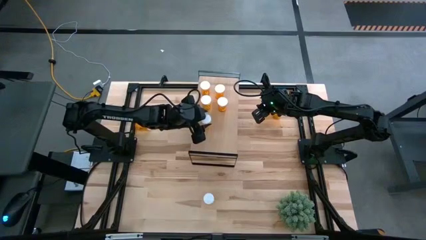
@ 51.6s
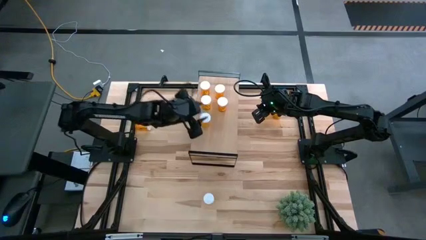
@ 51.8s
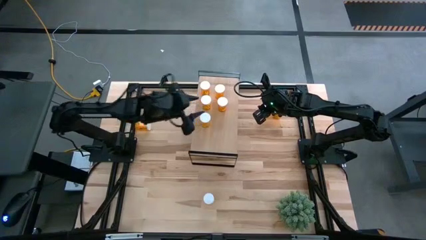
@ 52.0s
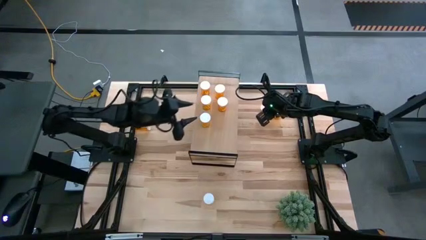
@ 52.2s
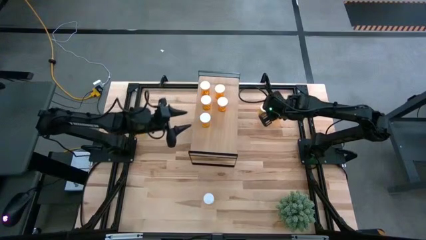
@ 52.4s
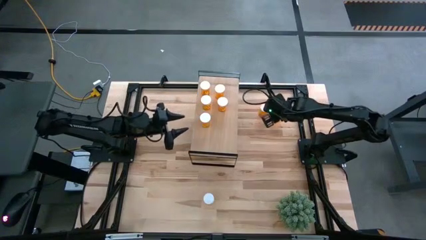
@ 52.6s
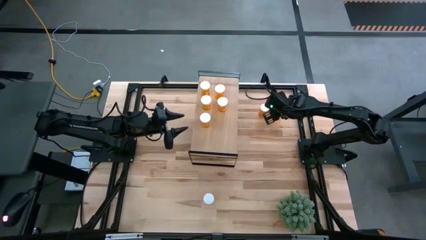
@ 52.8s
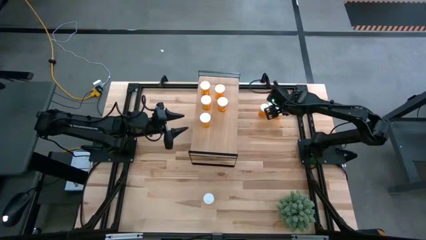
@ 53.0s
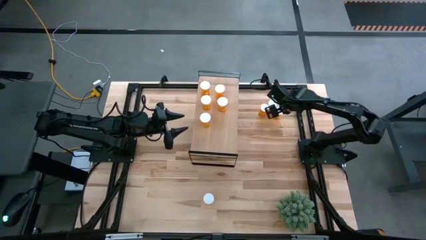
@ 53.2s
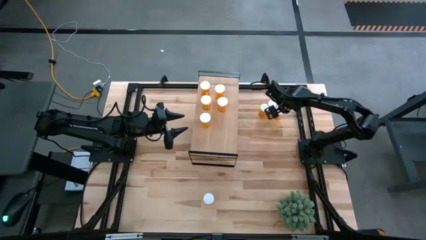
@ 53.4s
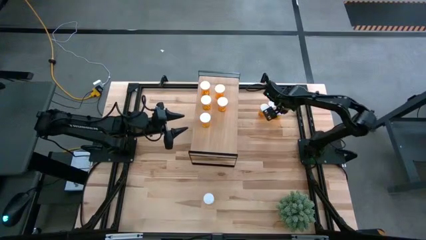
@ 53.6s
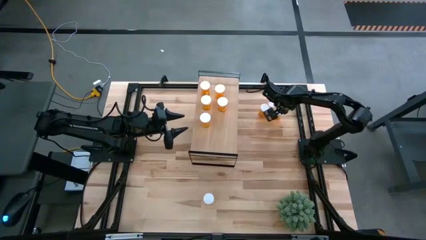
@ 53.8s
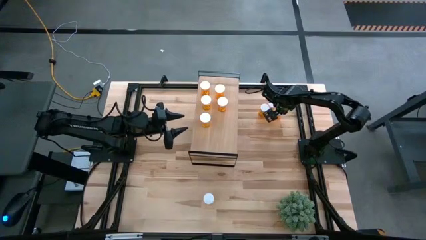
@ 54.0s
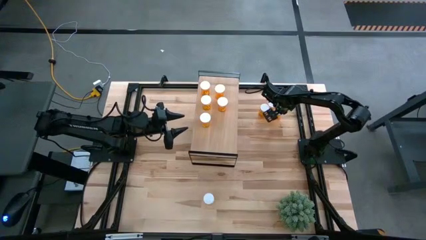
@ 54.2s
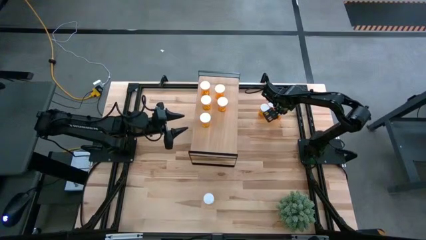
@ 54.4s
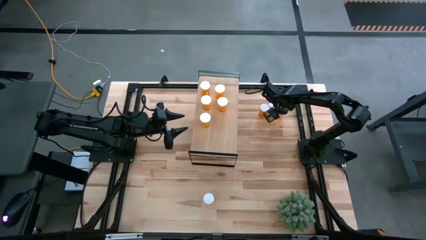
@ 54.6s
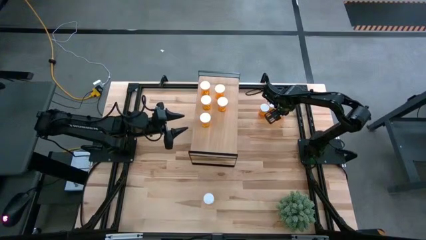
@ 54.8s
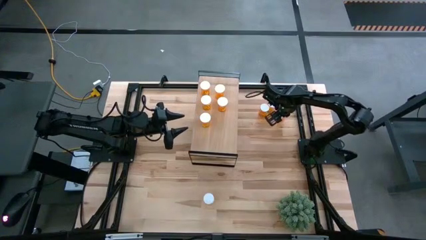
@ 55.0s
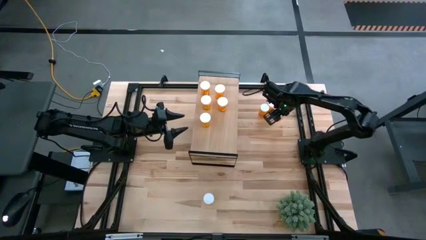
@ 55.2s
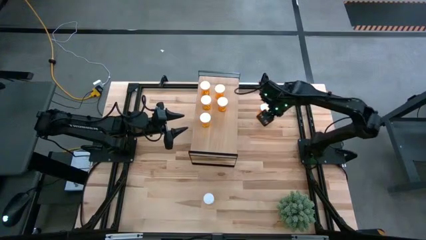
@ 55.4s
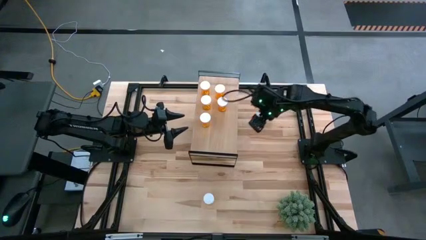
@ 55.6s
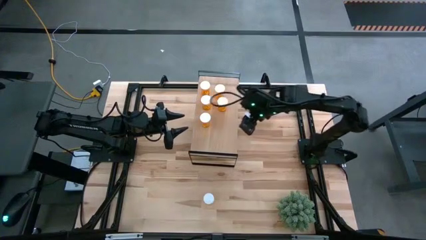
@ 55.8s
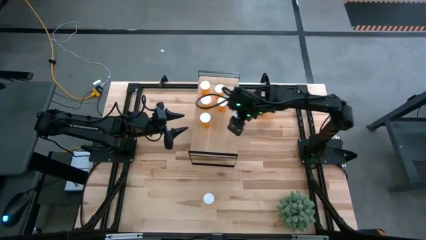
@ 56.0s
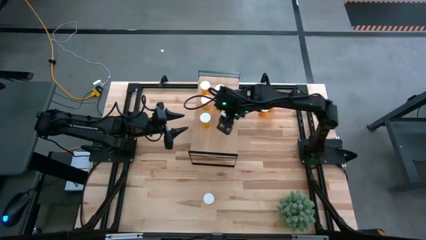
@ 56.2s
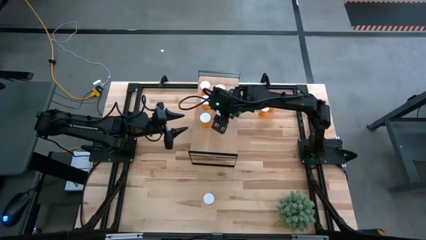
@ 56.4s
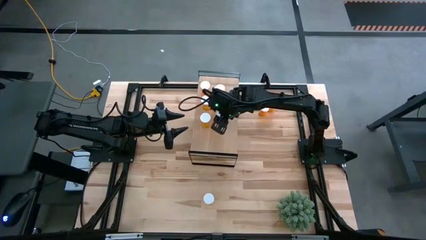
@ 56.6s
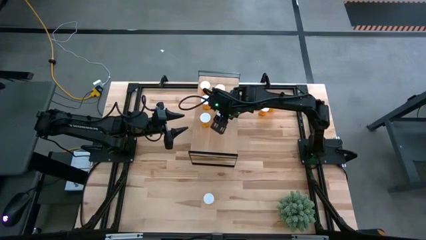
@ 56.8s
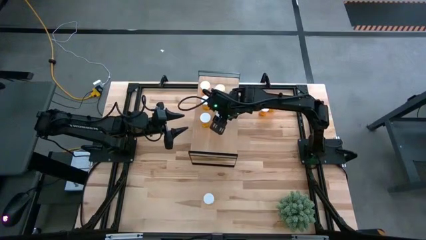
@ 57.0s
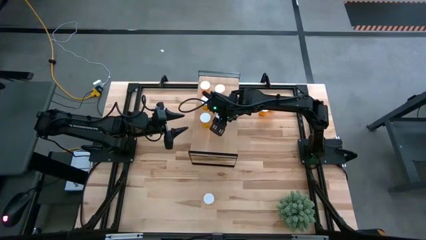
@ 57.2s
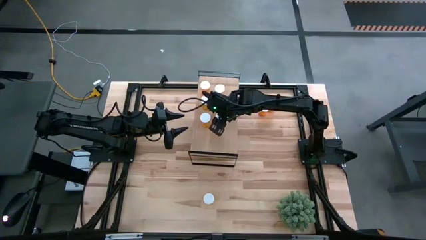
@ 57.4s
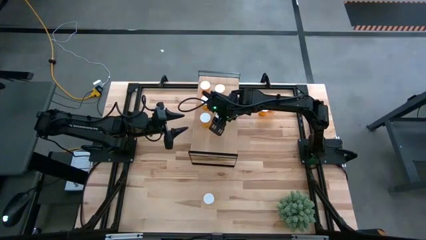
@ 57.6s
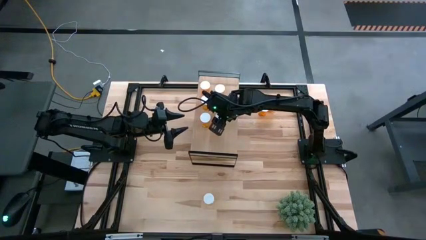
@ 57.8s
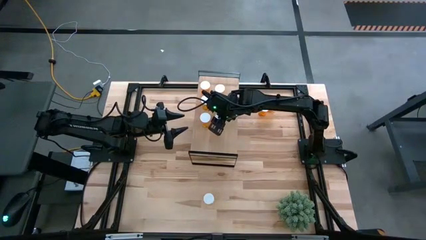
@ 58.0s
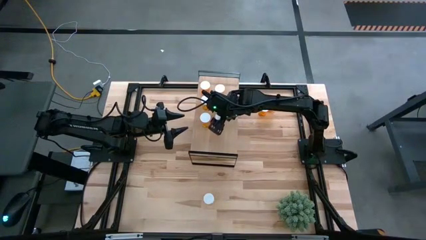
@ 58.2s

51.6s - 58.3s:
Task: Pick and place medicine bottles onto shelf by color
Put the orange pill bottle on the shelf

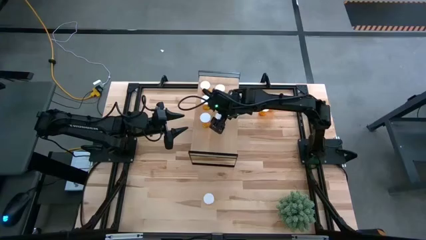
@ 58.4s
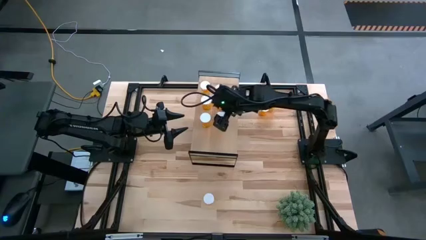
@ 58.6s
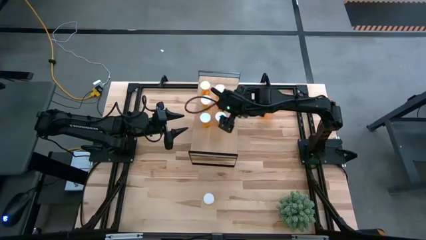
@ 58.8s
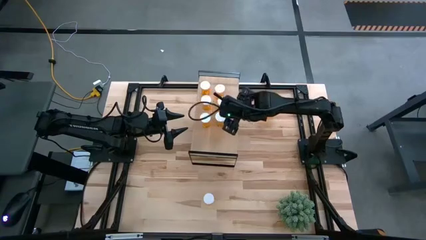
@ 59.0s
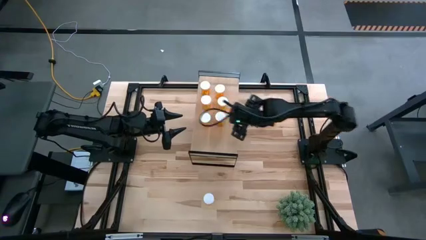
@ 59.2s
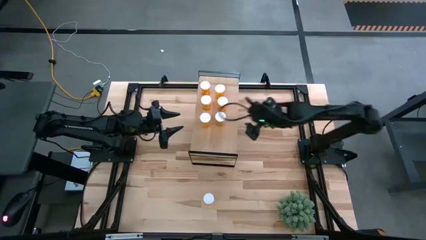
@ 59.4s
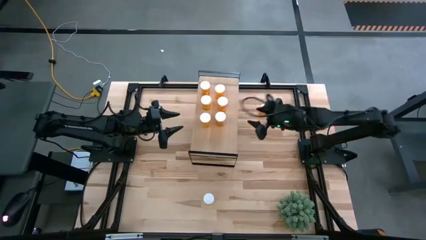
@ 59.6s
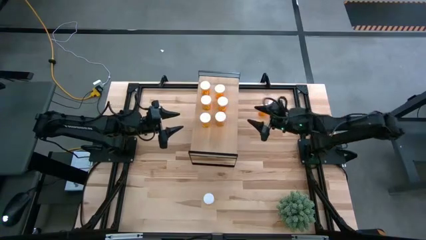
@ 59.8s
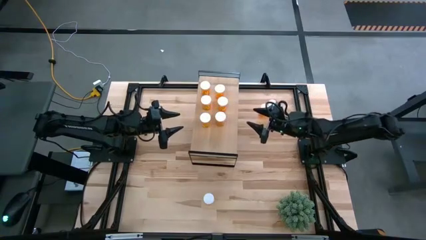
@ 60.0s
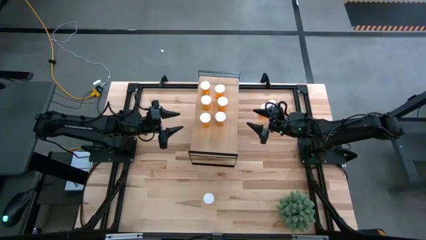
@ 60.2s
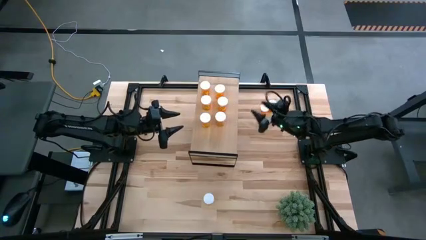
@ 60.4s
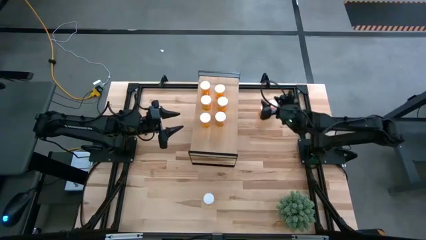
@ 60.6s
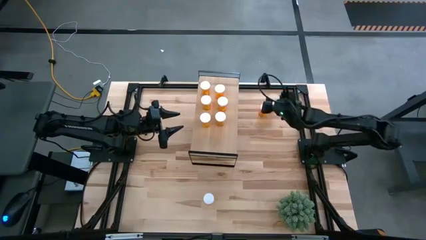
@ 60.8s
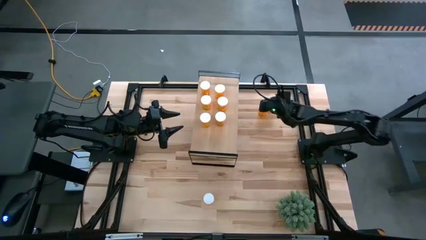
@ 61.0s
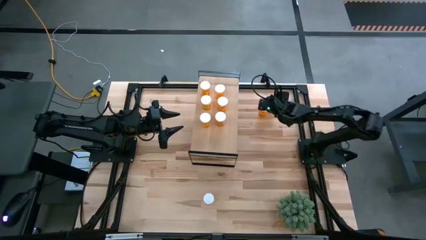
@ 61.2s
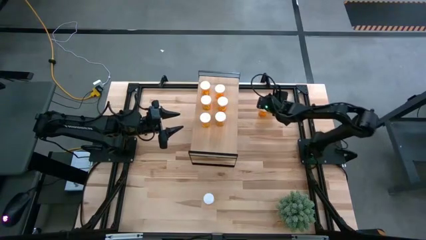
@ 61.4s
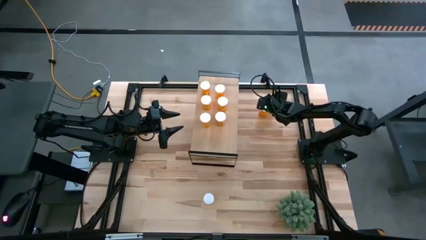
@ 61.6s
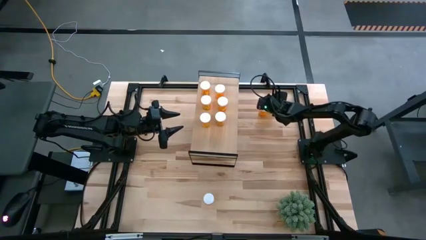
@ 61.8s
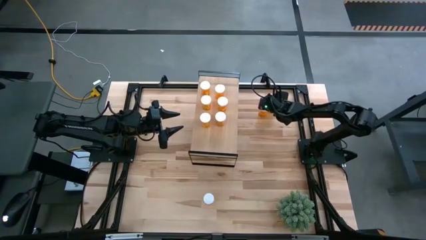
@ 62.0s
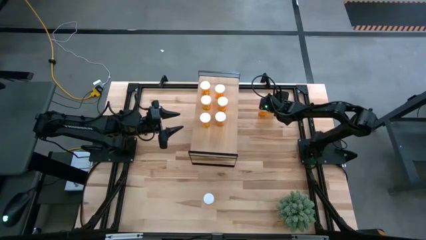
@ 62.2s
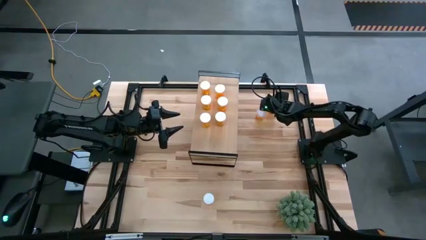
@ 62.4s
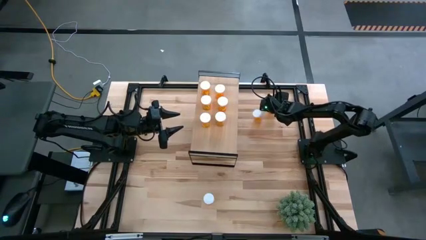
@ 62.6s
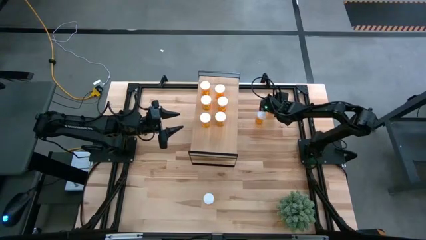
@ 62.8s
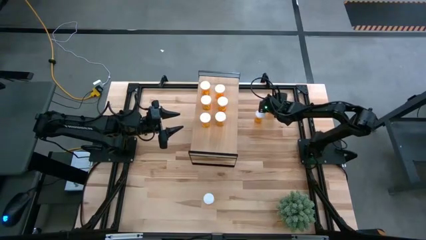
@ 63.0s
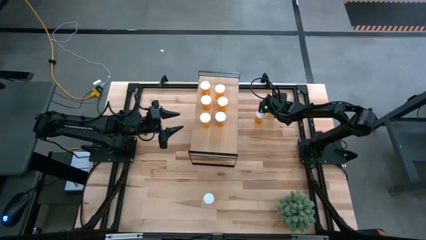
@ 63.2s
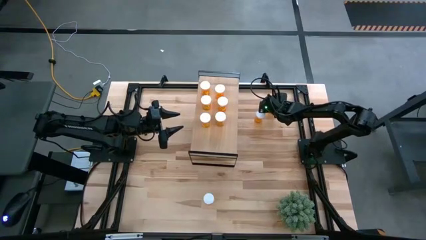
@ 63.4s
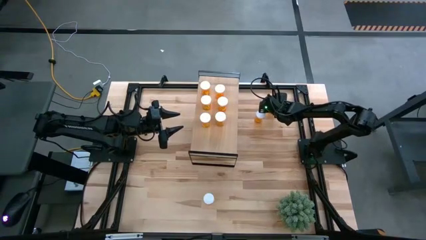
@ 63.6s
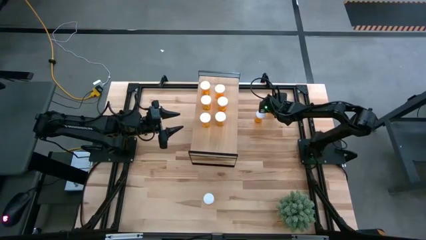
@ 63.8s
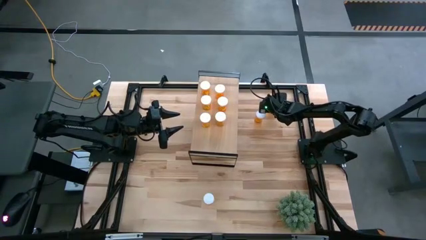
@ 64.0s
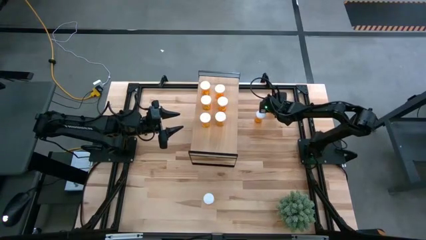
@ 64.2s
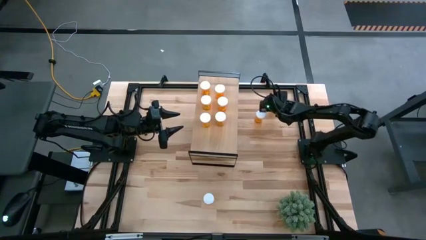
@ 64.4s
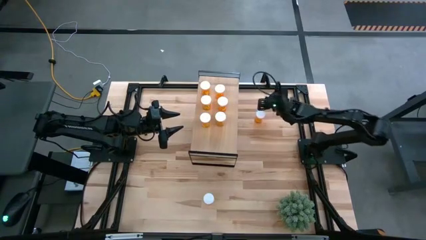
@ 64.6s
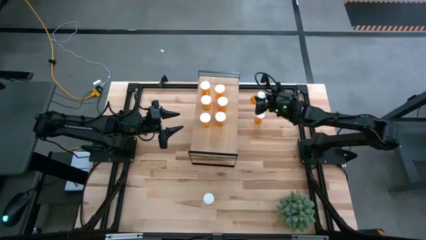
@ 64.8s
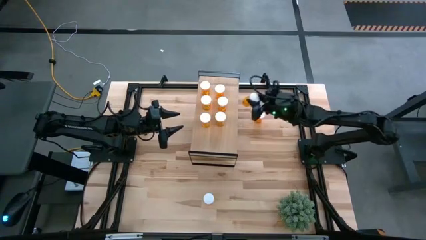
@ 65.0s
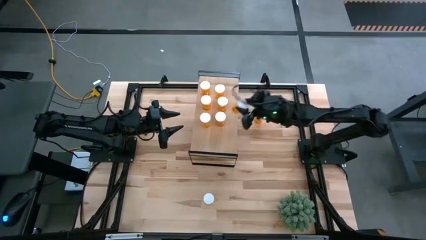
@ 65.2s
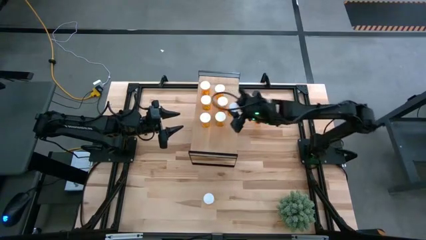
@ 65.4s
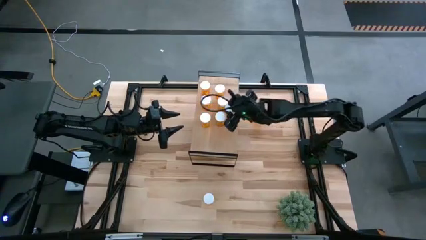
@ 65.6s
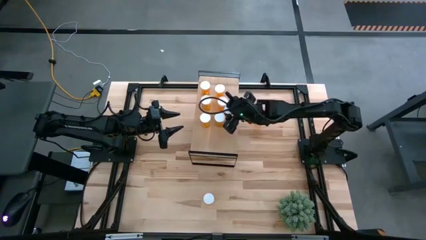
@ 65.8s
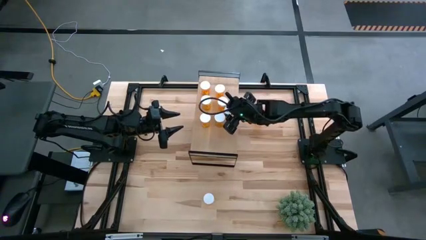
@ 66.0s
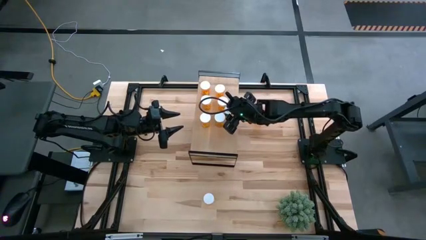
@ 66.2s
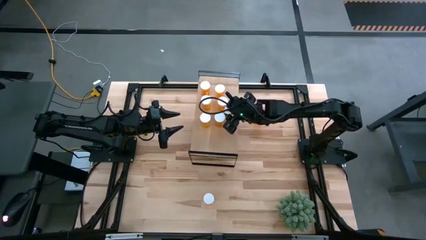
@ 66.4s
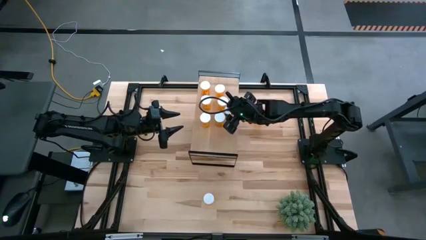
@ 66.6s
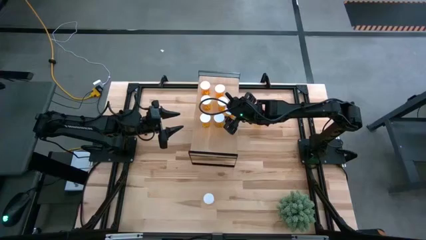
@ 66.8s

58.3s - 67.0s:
Put the orange pill bottle on the shelf
